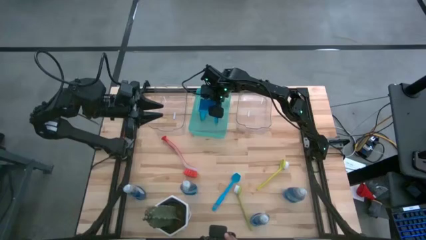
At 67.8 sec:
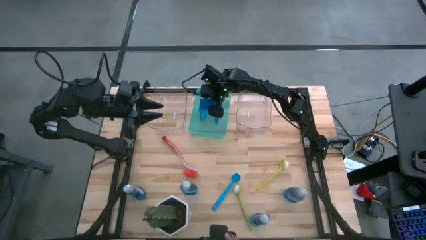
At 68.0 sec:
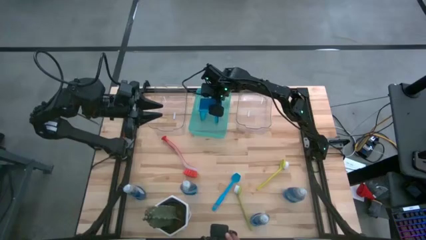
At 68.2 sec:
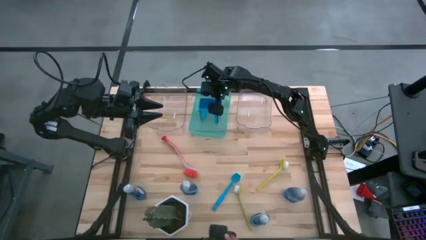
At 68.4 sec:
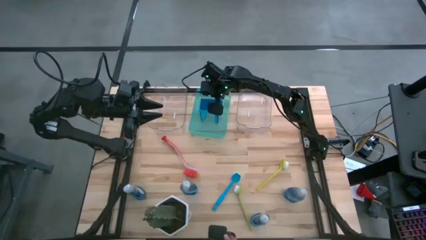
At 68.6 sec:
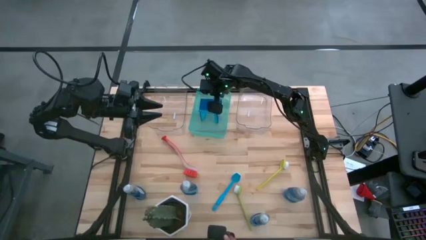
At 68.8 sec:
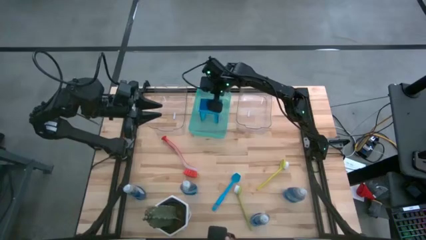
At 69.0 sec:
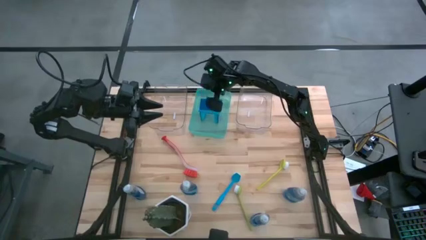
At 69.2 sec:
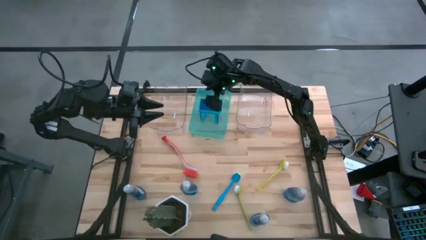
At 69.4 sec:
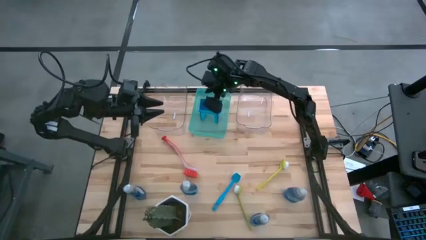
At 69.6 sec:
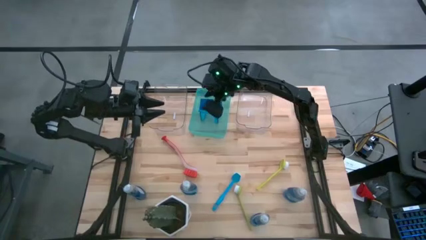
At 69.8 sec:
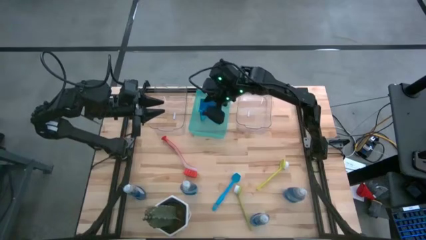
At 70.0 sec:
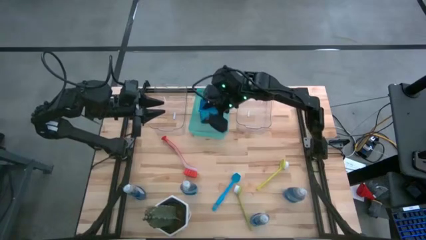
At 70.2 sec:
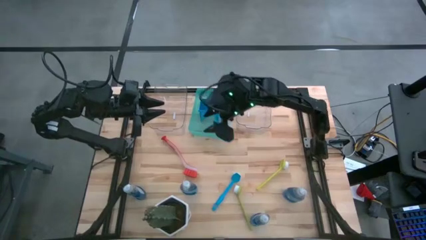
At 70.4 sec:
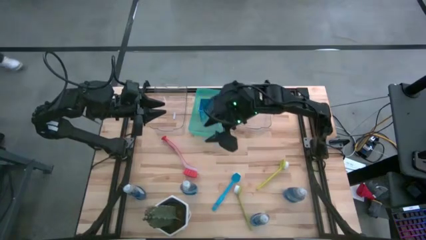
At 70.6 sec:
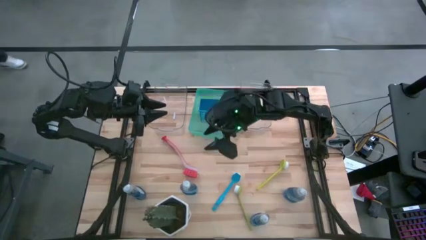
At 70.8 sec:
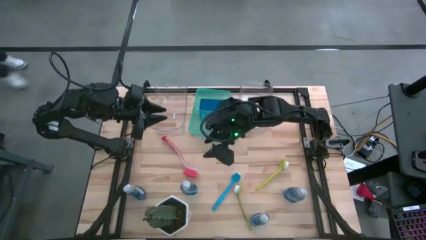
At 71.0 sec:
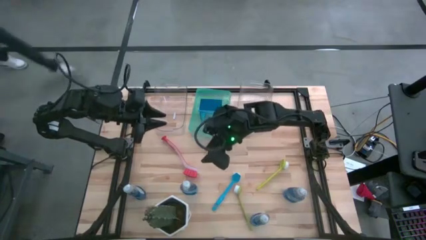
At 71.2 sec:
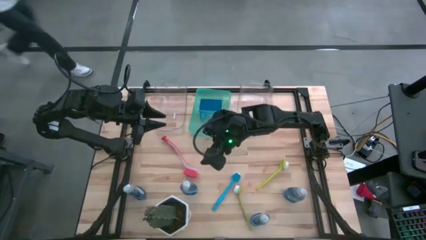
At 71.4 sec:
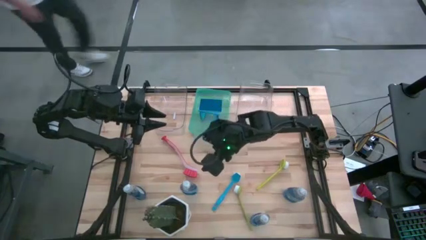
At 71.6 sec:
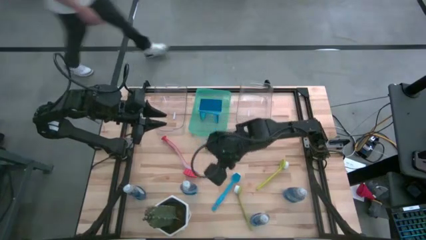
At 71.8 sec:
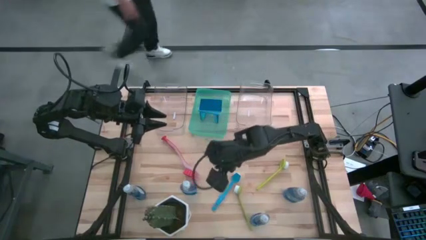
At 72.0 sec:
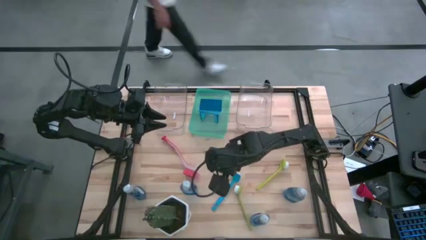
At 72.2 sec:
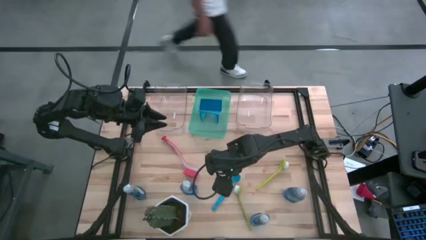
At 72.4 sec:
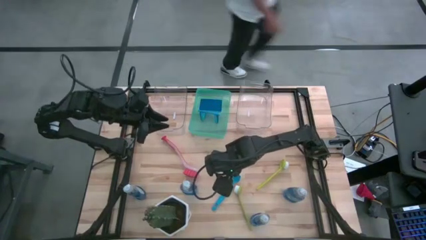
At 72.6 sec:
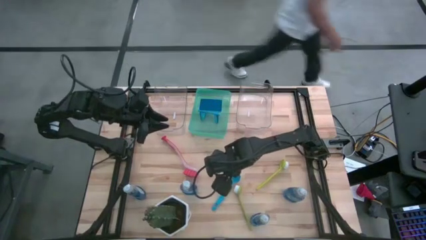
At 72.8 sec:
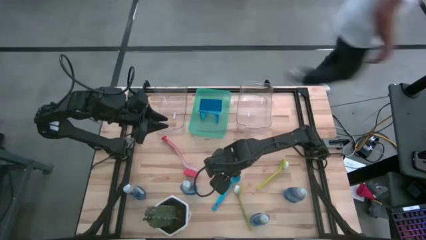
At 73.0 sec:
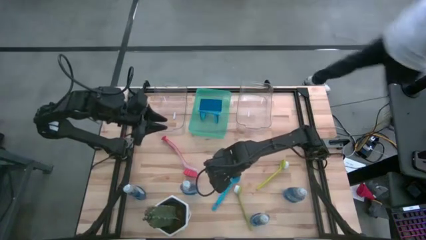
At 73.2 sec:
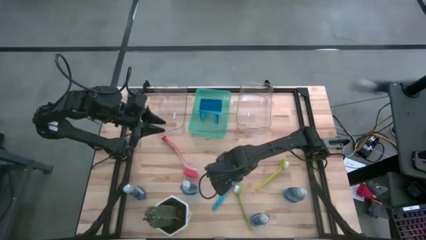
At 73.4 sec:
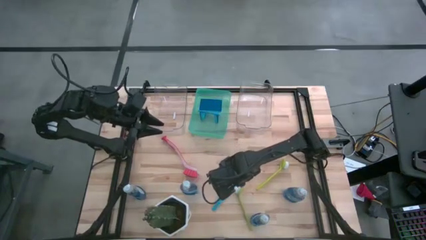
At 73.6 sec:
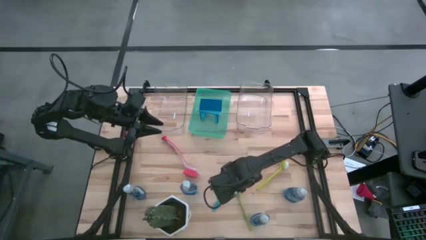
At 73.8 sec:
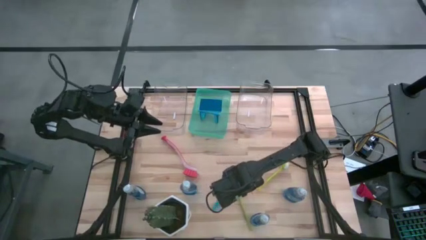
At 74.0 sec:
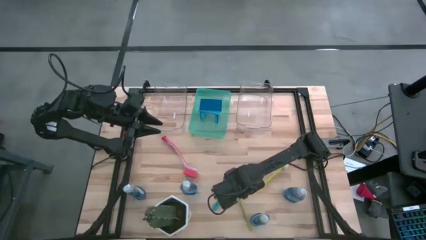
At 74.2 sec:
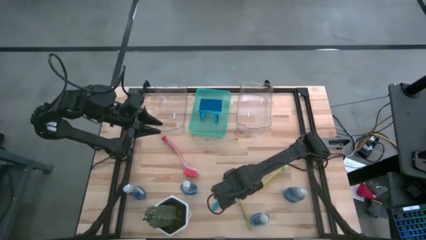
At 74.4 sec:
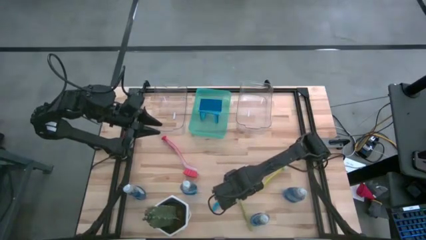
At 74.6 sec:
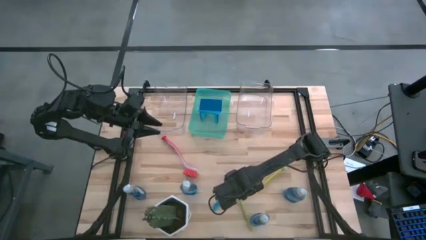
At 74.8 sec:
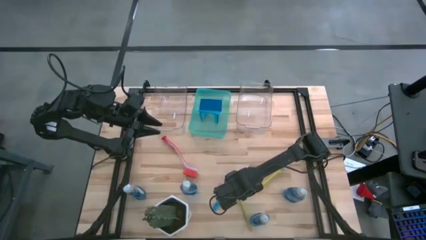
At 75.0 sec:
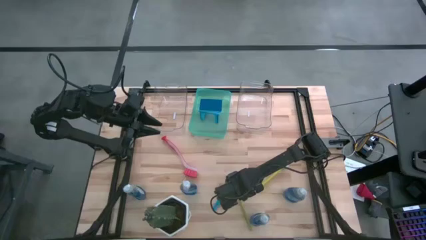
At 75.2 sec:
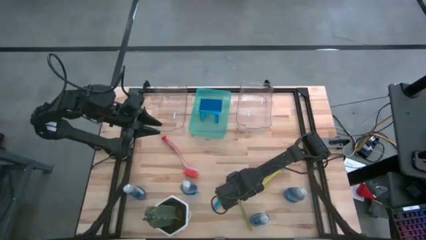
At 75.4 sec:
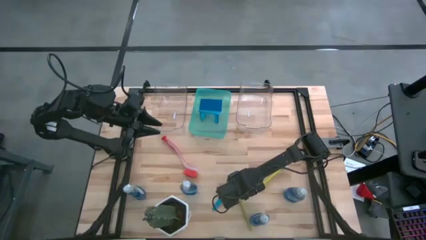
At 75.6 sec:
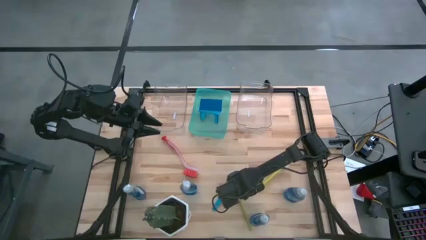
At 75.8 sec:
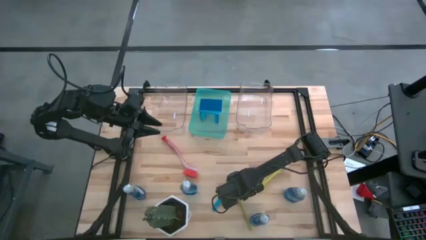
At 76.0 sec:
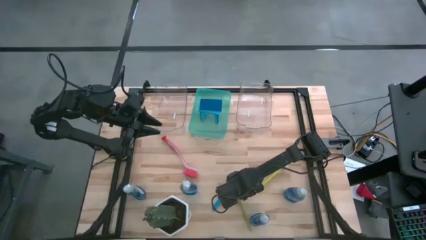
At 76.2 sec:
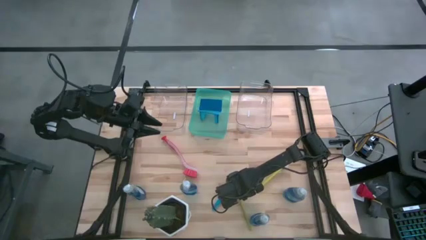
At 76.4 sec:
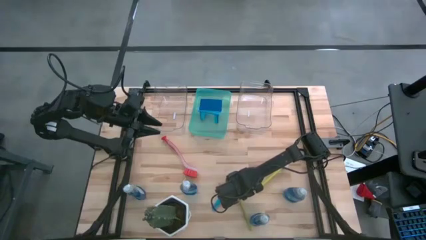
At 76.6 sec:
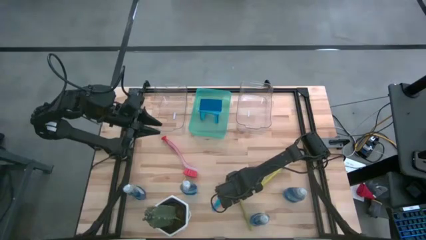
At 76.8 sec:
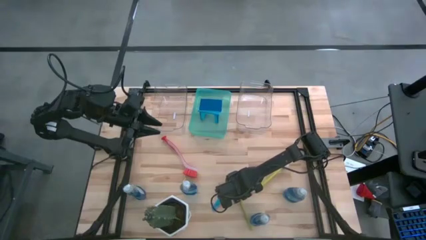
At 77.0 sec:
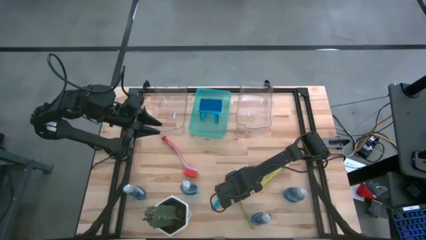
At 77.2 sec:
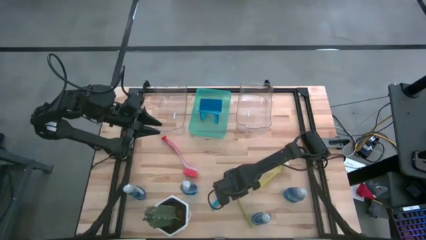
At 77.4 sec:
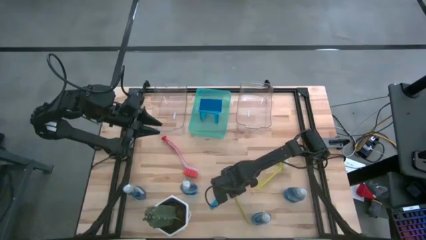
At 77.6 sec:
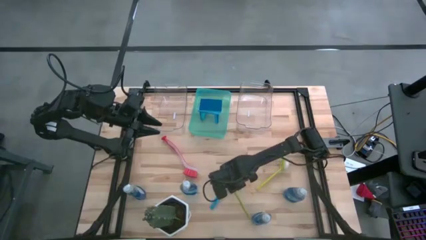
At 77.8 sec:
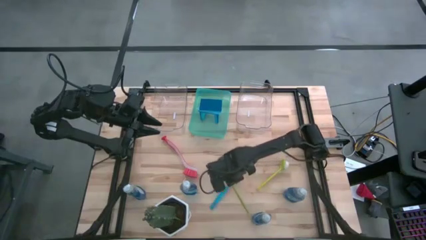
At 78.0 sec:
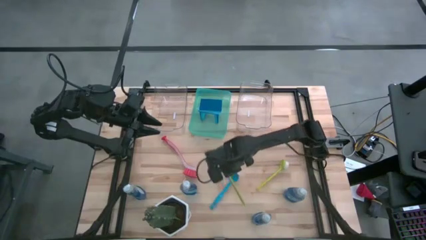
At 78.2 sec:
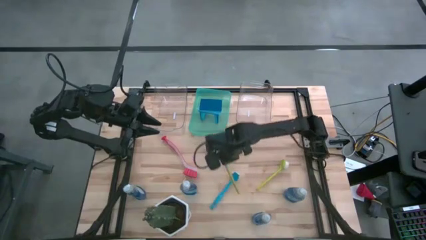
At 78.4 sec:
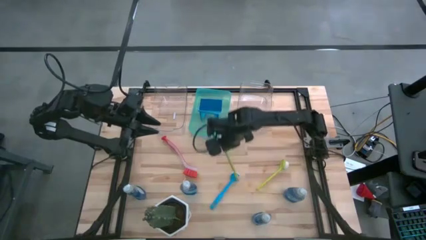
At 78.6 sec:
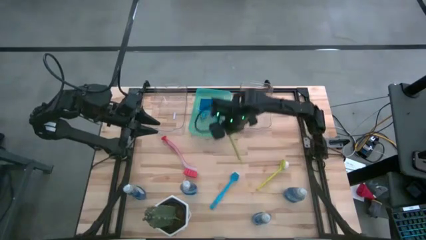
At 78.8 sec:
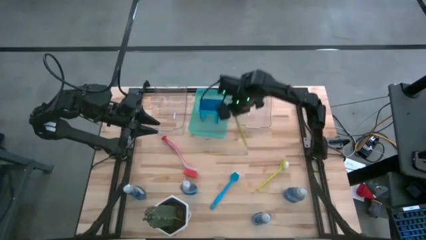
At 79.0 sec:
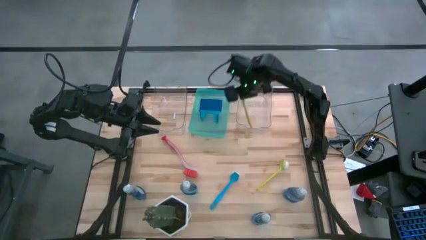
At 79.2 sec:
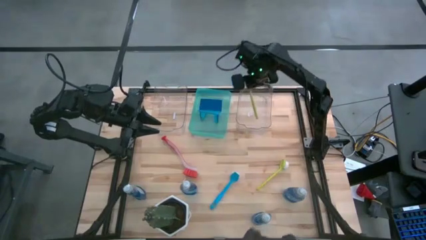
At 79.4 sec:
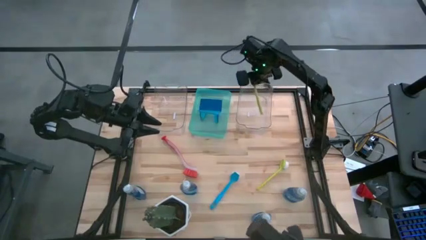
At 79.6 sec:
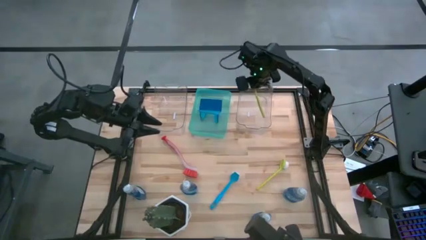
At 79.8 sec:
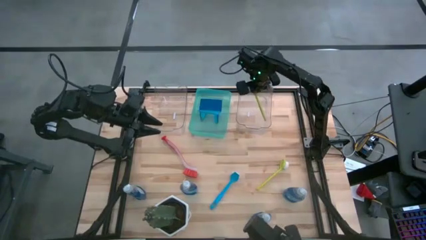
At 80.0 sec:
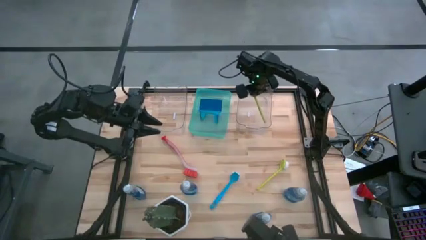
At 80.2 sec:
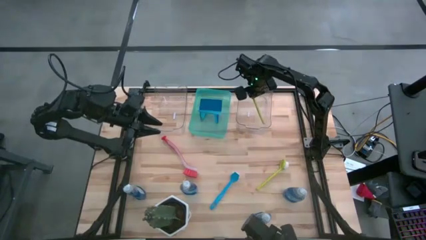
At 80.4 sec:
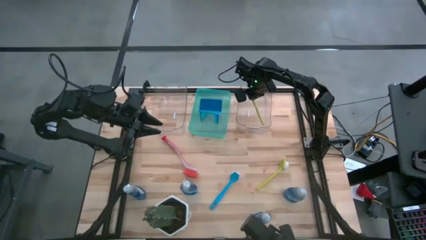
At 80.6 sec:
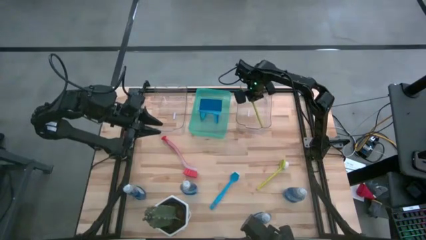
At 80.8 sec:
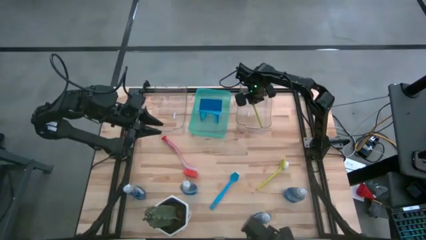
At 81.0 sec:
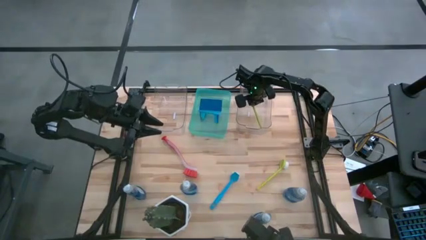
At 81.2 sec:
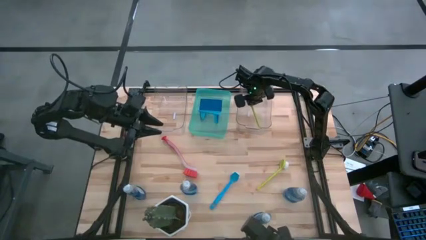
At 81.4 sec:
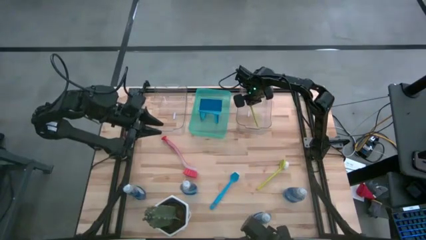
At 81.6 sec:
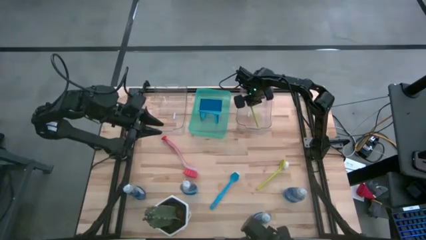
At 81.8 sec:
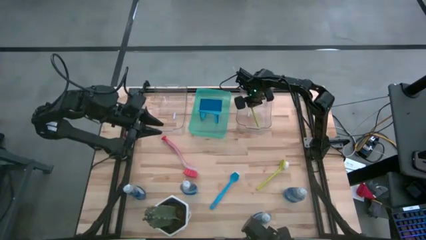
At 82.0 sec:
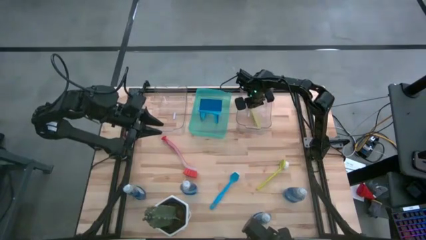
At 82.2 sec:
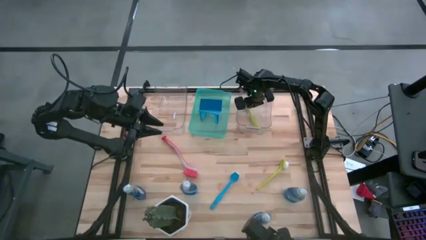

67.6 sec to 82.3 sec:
Task: Pick & Place Kitchen Sink Supplies
Put the bottom light green dish brush into the right transparent bin
